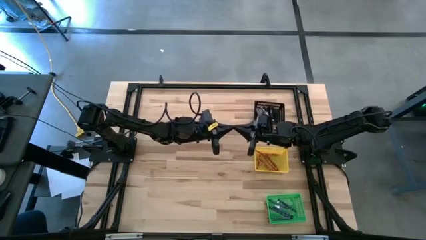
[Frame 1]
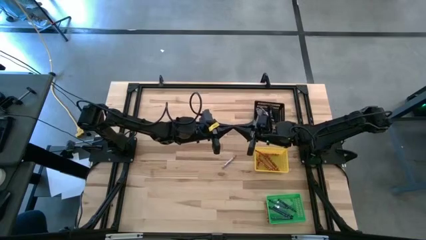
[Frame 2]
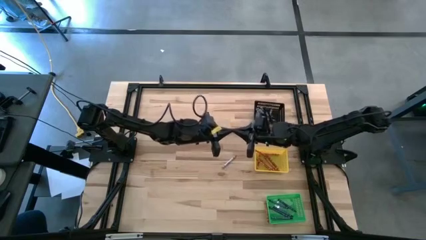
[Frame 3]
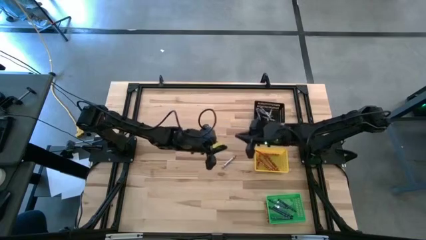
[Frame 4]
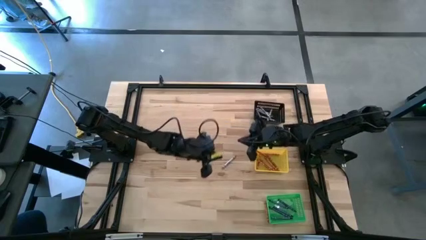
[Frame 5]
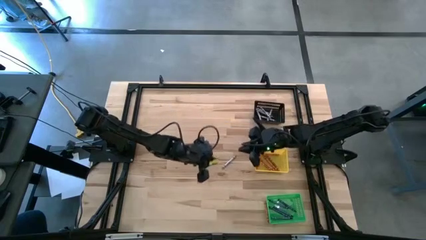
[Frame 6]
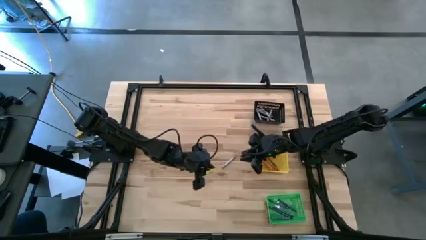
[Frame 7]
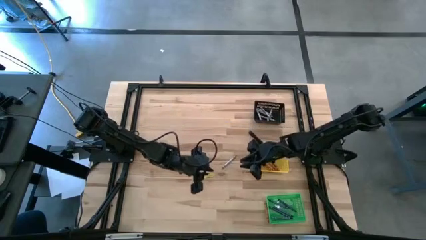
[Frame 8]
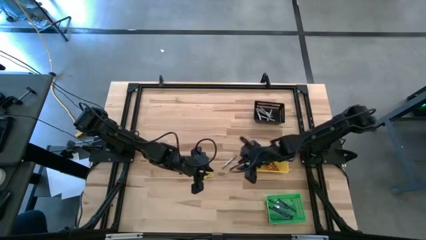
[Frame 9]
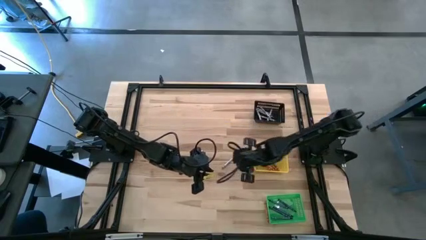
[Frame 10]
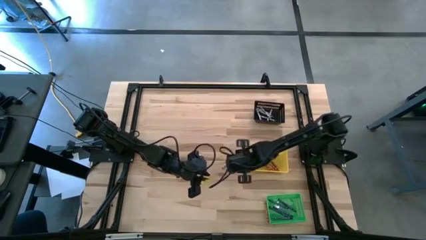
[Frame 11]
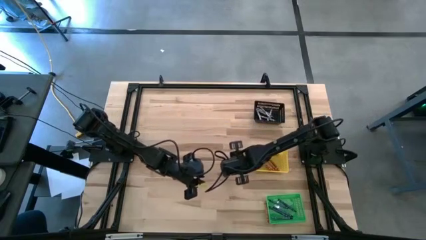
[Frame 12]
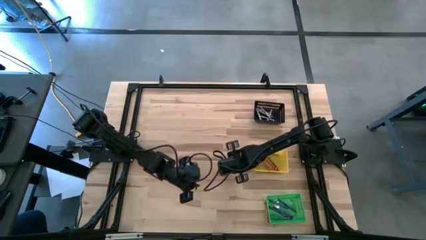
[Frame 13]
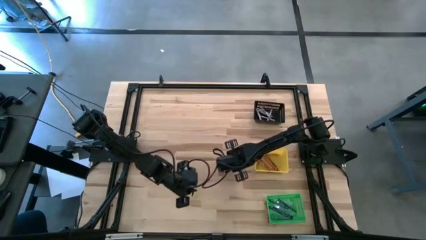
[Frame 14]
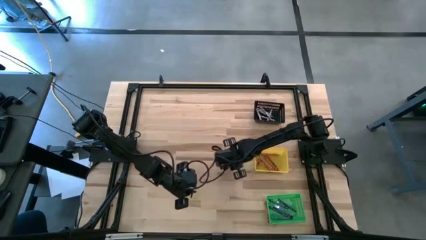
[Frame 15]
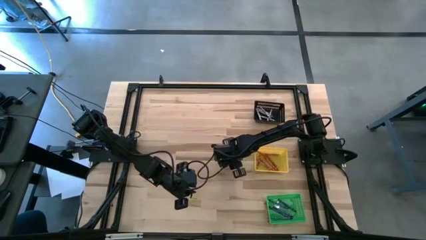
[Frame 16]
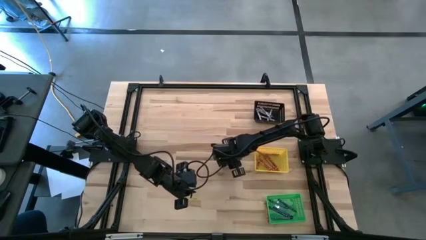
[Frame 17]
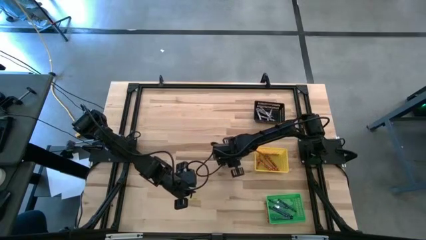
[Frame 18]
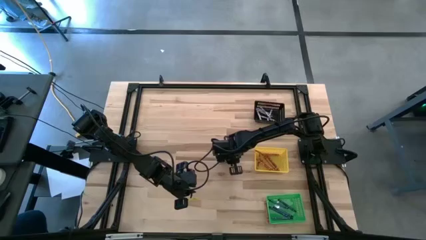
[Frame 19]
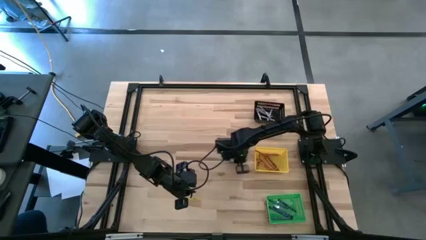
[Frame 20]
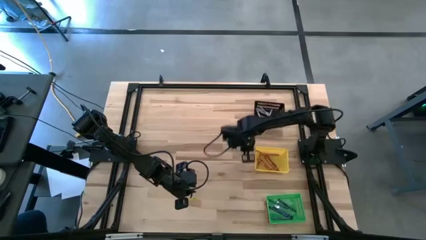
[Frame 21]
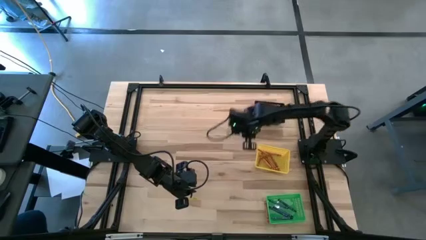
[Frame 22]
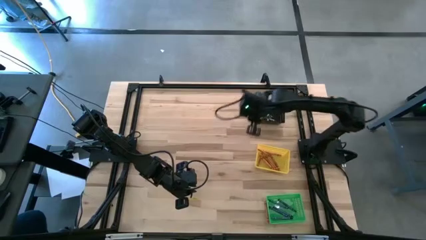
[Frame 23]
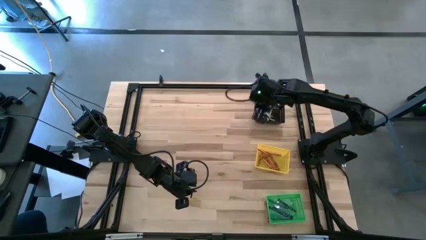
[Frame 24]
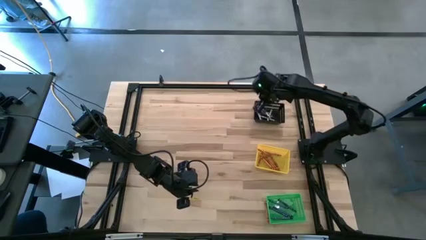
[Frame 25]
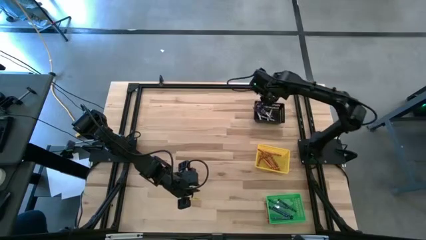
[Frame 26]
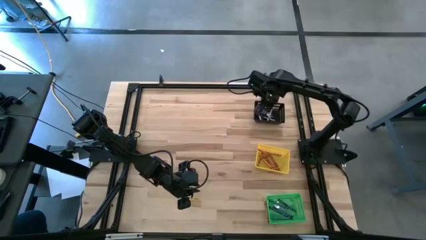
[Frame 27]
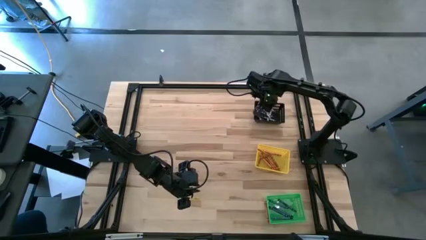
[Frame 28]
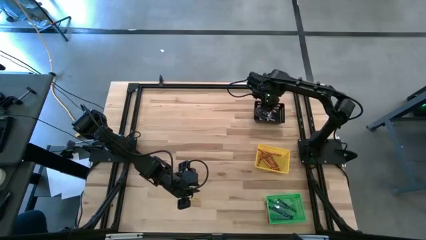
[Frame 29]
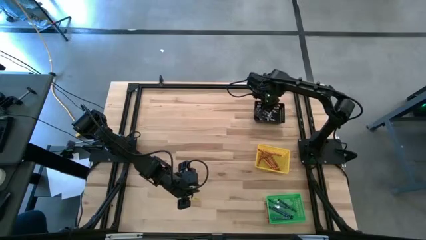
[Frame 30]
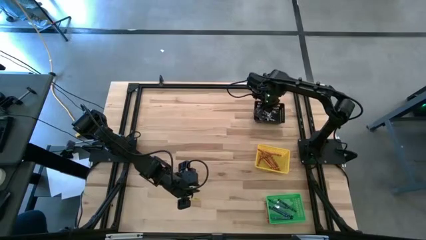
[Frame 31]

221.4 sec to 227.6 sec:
Task: Sort crayons
Put the gray crayon into the black basket

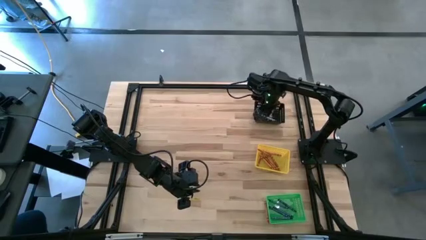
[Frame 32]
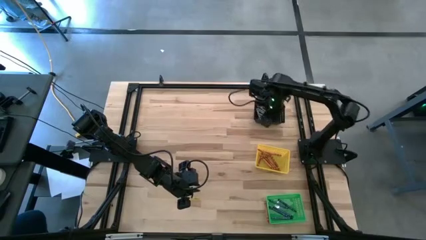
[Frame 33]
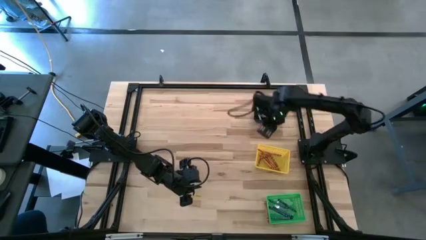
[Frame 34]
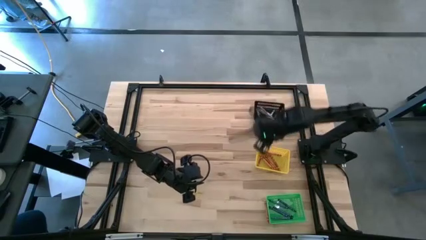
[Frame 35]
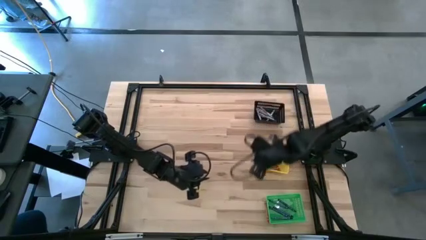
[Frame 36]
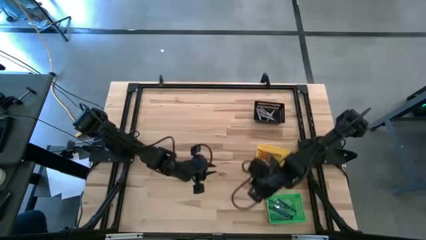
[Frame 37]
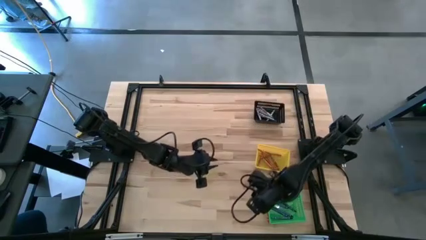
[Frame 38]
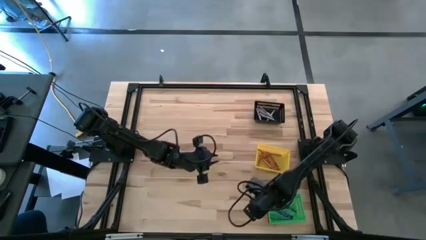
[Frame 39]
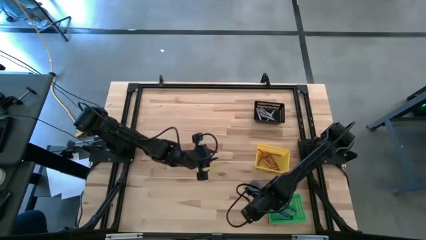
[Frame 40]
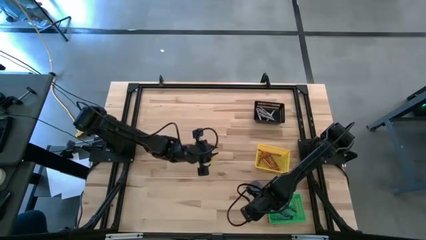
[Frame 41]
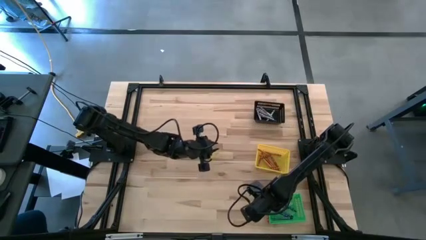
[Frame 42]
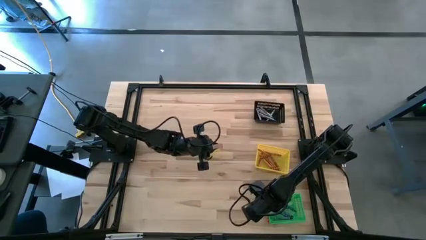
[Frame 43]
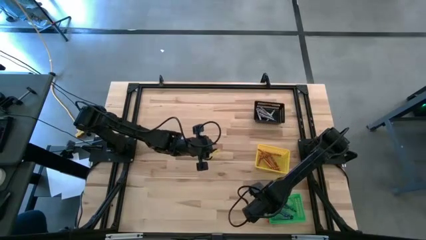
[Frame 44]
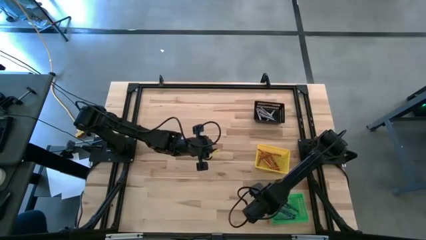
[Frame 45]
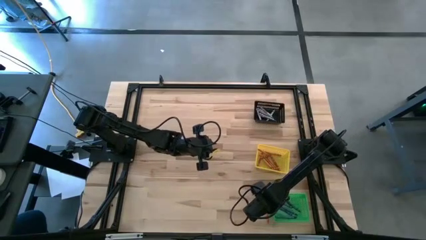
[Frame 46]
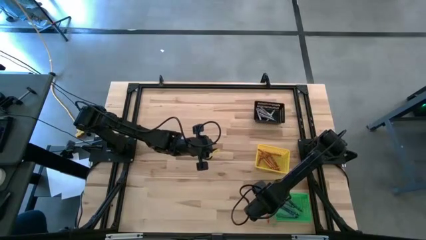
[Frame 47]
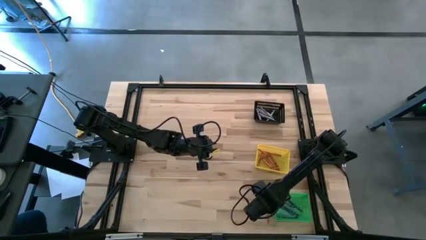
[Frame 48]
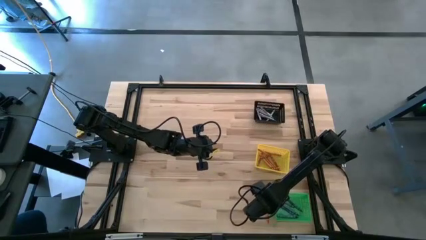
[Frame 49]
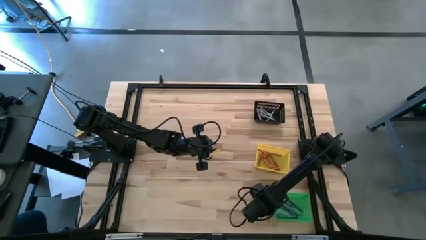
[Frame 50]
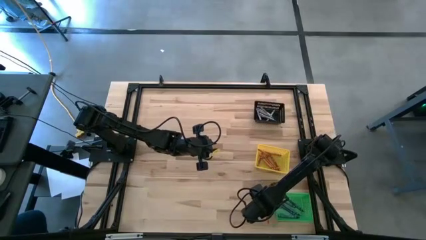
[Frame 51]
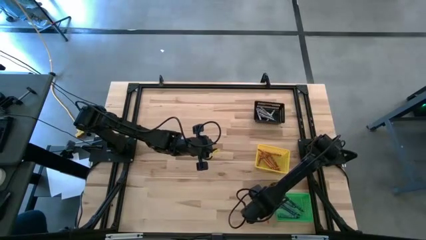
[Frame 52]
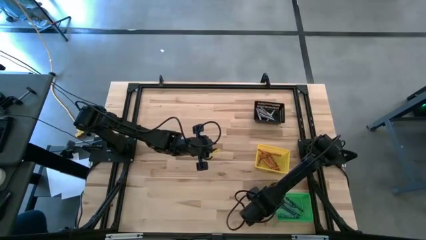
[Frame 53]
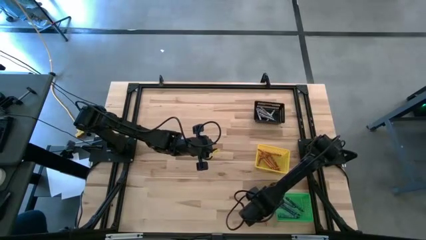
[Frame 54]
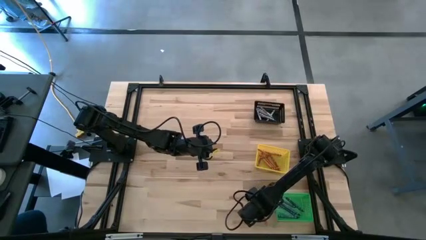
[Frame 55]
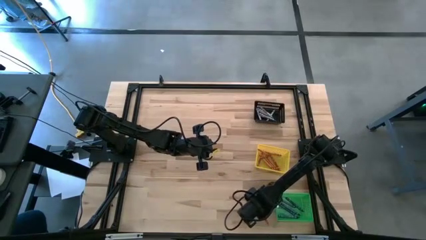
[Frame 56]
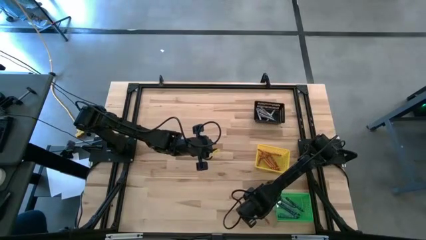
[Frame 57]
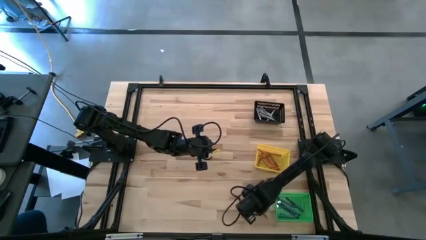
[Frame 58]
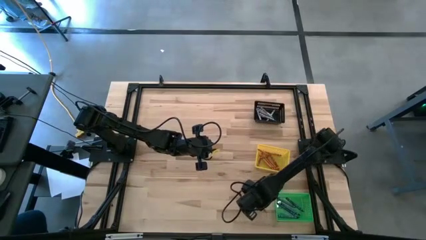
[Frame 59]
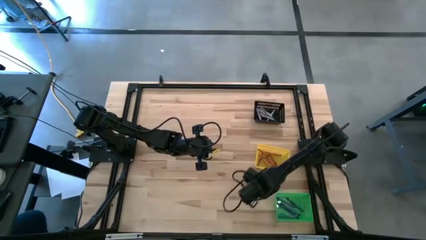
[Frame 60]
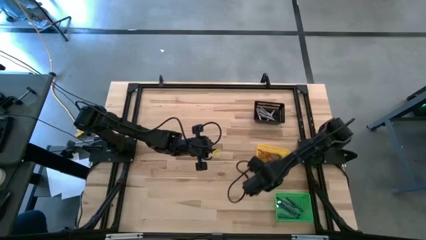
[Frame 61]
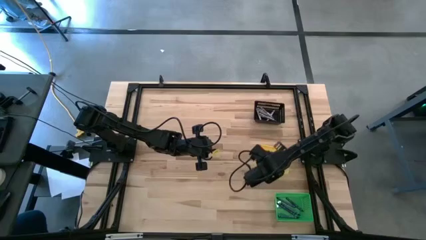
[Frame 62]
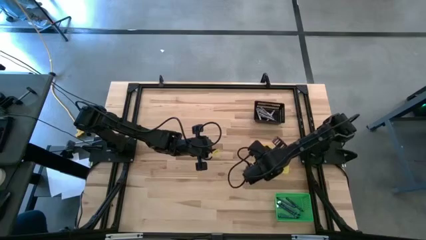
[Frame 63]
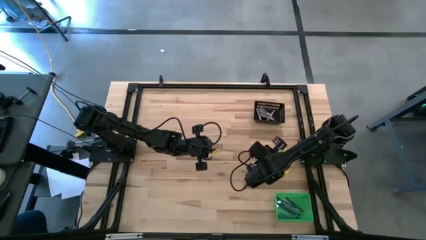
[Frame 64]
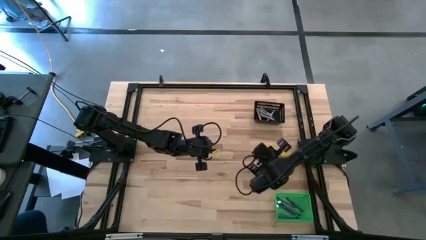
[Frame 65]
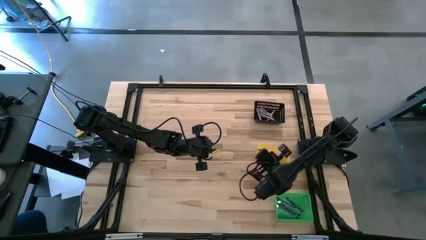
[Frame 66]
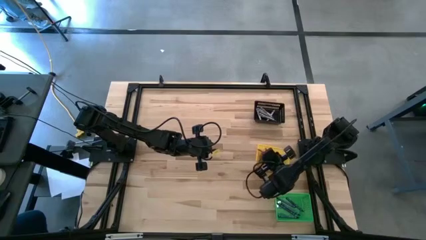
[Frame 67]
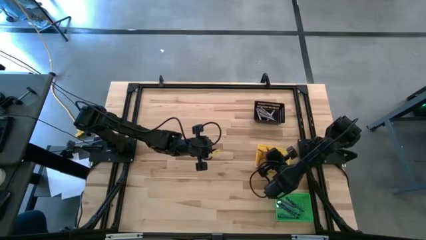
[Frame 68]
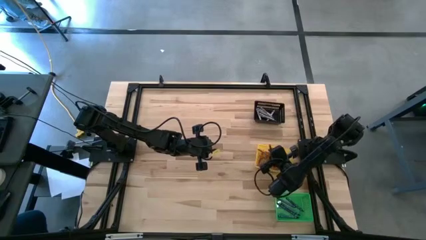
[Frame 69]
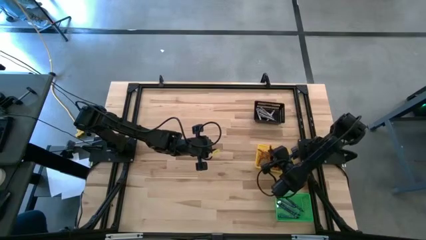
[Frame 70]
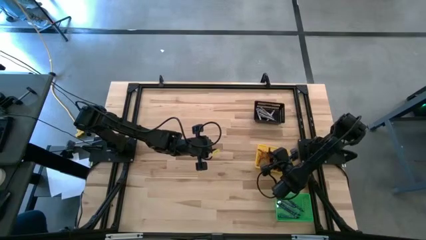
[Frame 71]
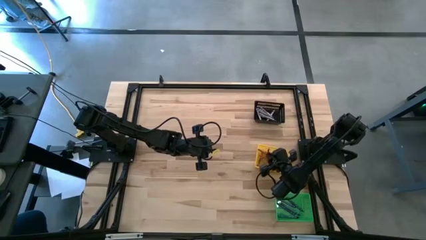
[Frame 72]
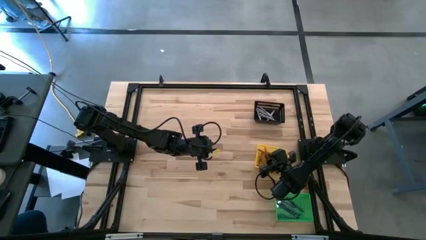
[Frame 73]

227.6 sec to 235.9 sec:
Put the orange crayon into the yellow basket

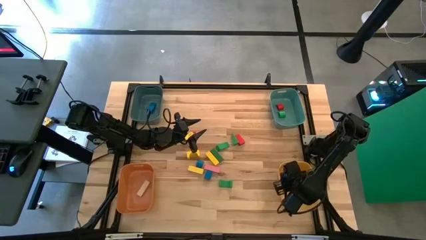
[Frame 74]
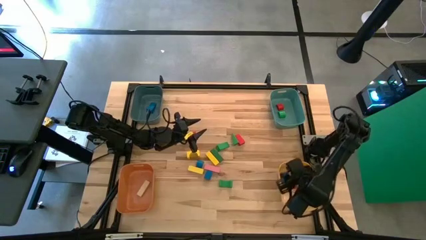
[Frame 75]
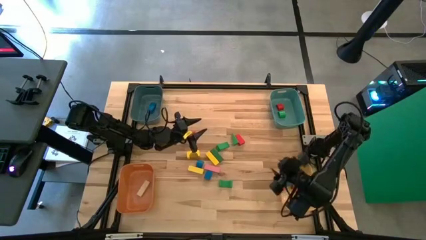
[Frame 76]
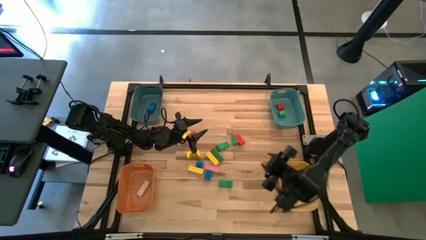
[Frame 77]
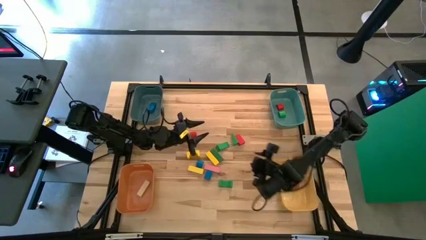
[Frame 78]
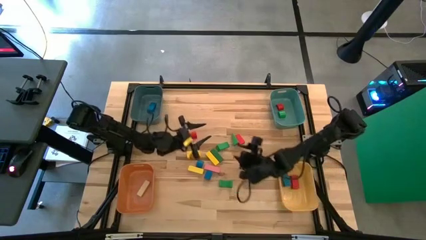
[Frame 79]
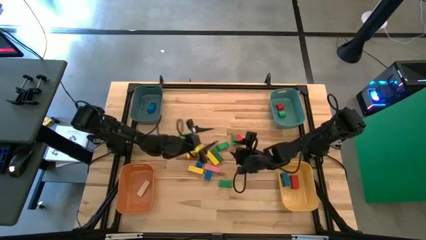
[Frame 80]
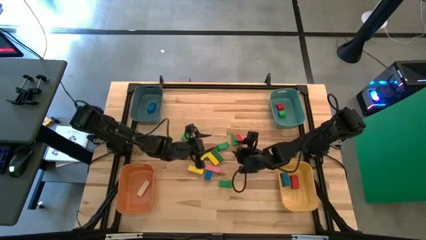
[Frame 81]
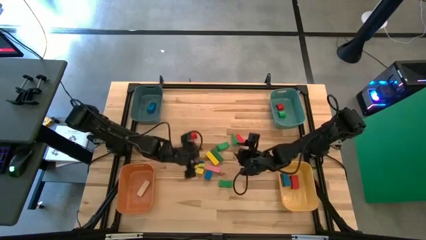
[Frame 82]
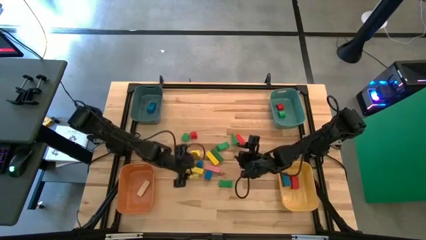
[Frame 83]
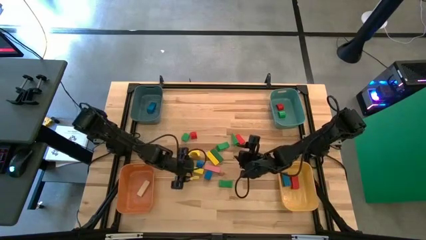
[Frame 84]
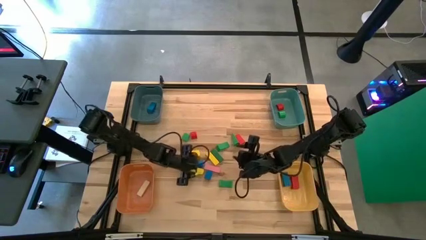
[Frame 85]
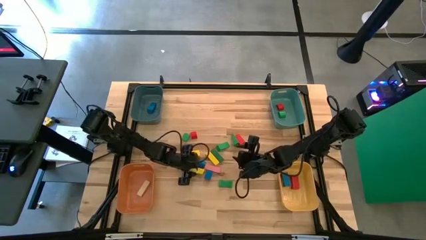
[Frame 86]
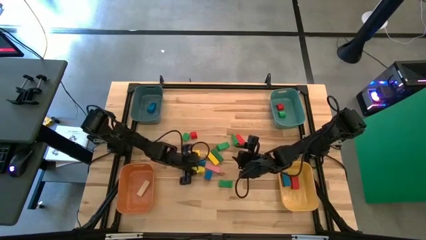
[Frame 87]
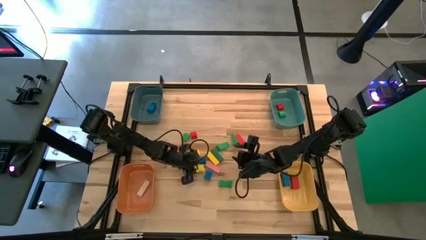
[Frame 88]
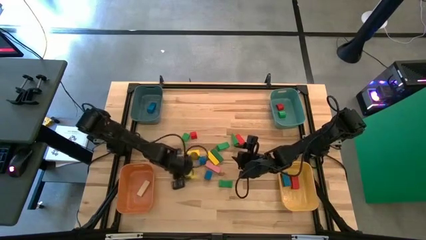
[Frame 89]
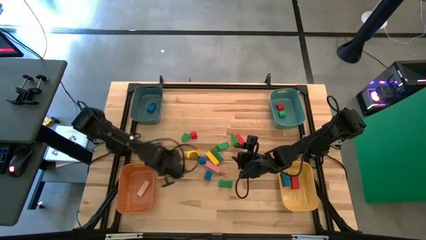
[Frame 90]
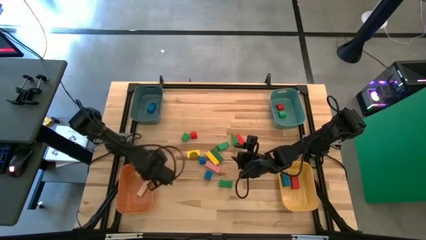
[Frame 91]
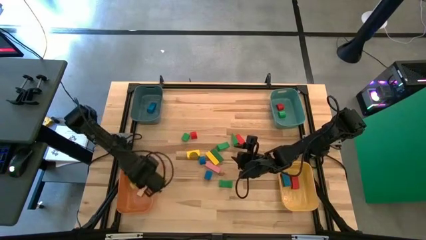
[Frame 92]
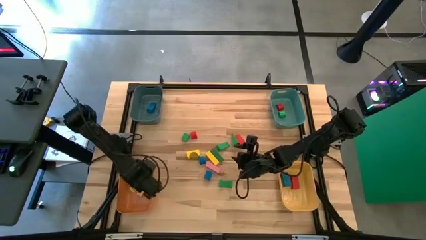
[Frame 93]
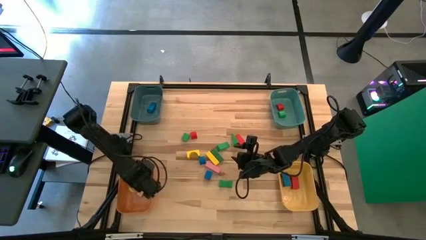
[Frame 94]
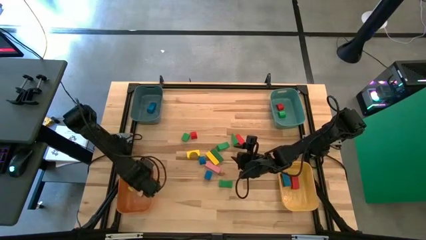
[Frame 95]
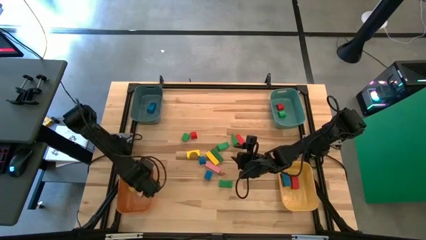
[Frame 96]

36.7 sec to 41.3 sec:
Task: Sort blocks by size
Put the yellow rectangular block into the orange bin
